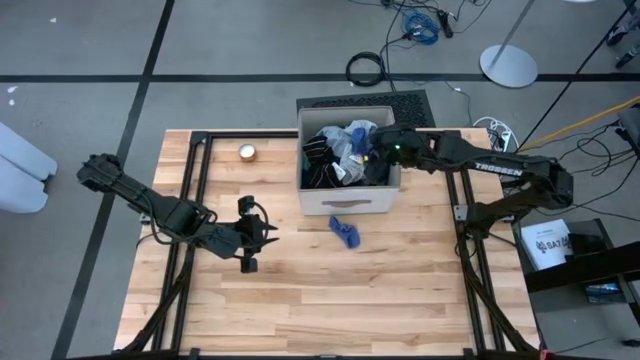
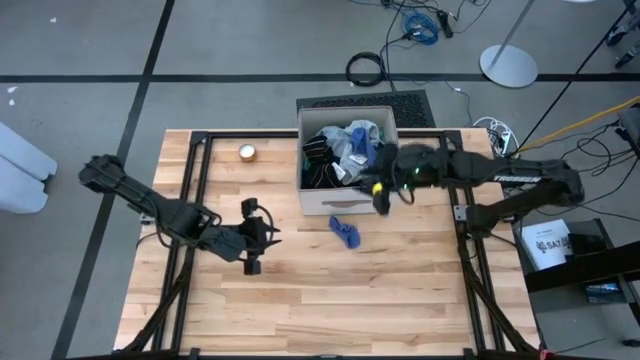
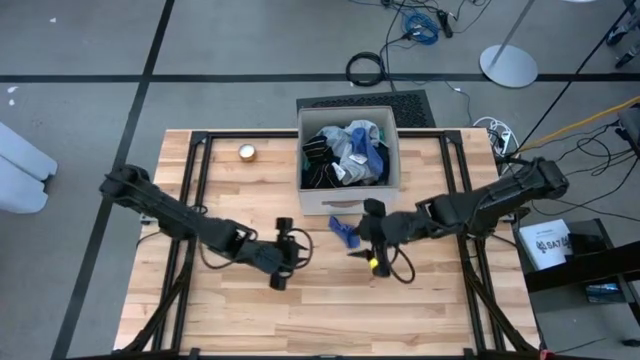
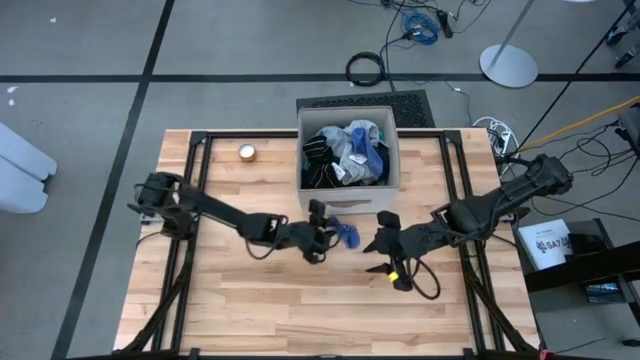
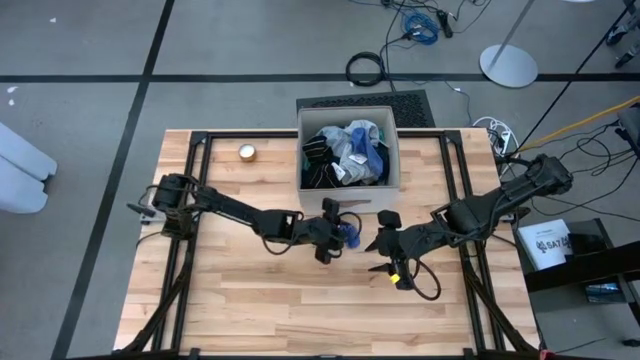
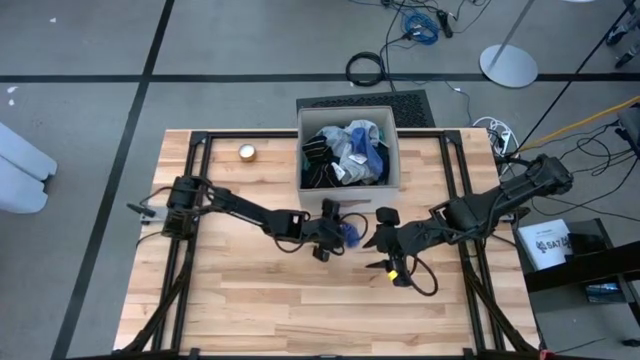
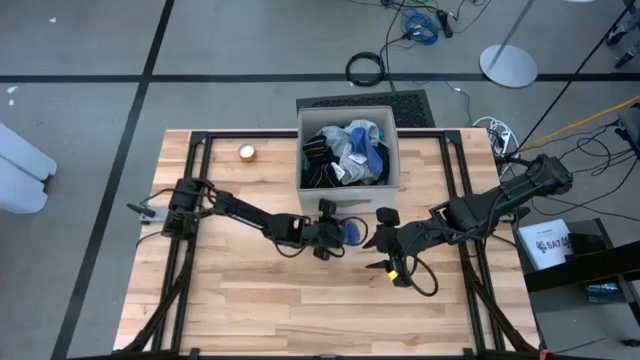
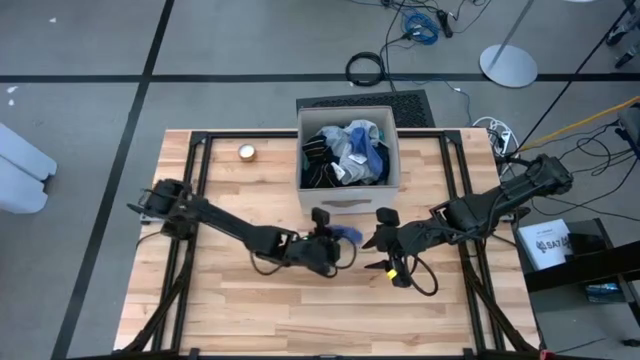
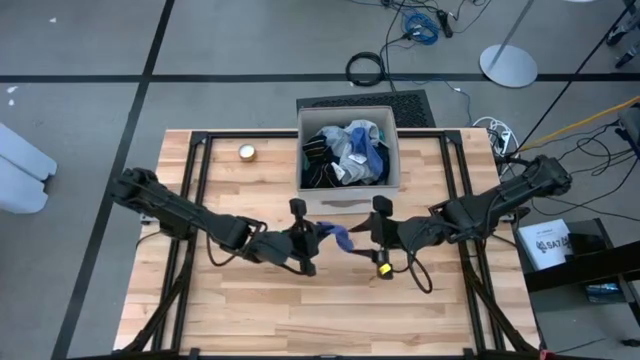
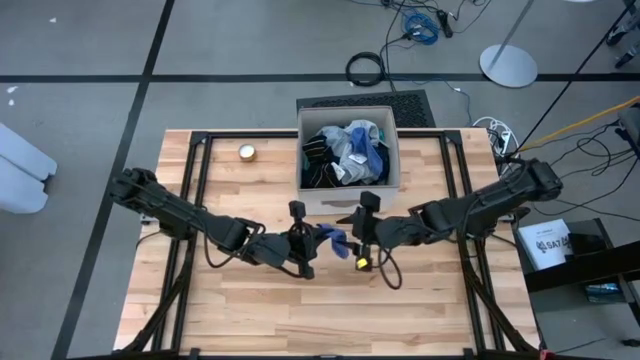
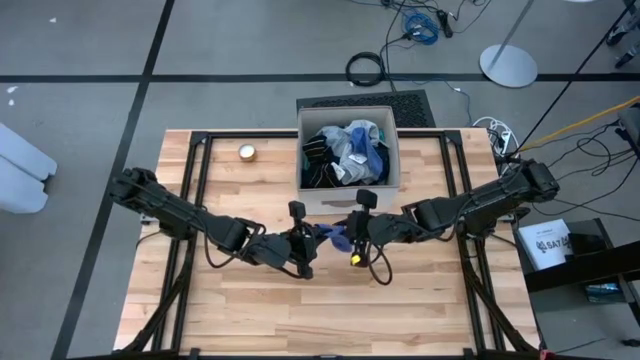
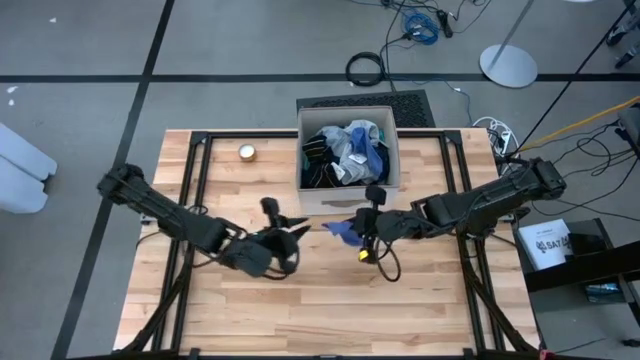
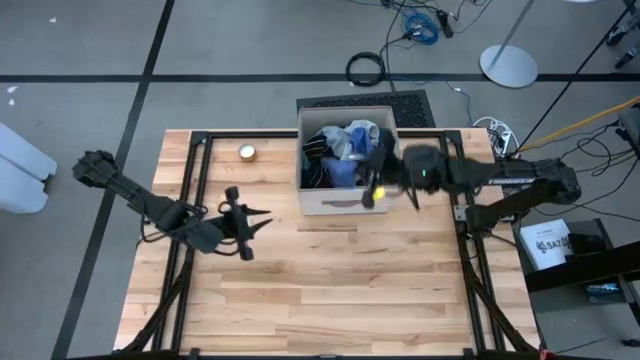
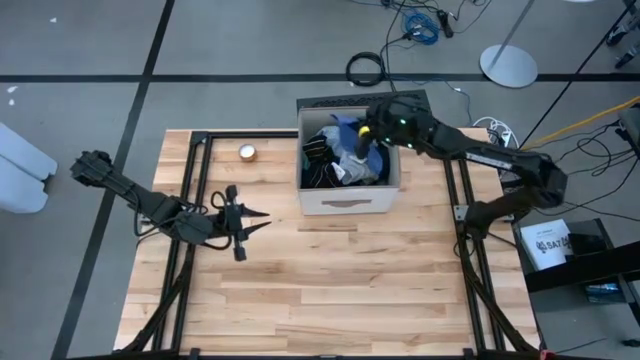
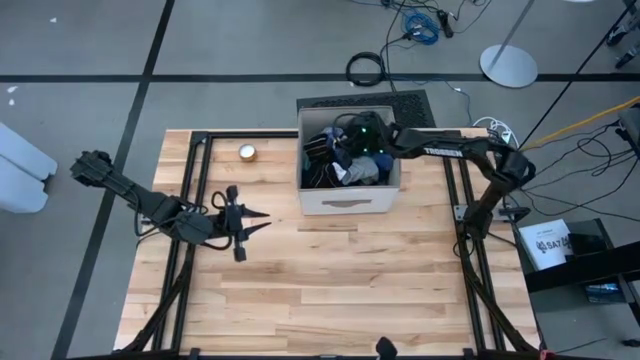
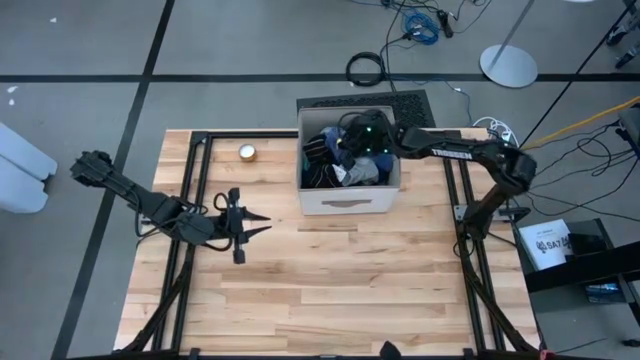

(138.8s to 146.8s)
Task: Sort clothes
Put the purple sock into the laundry organizer

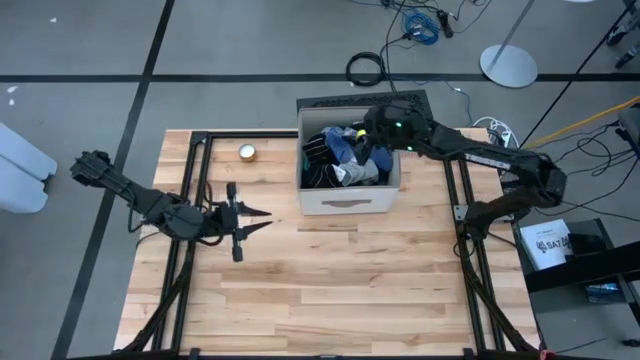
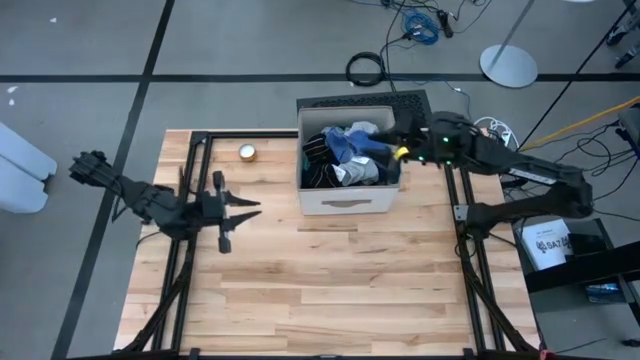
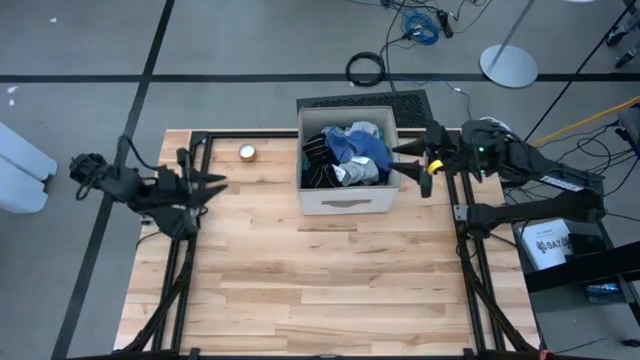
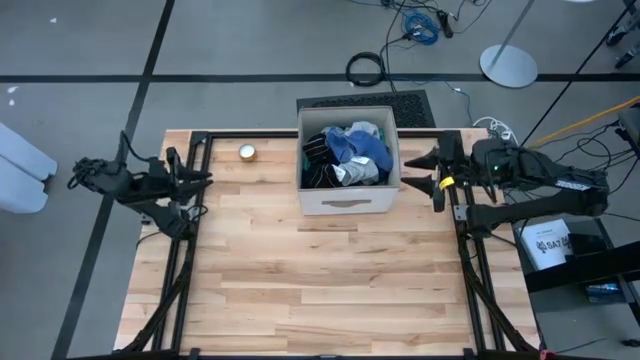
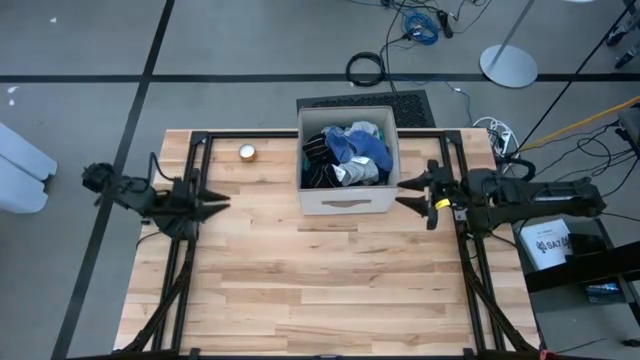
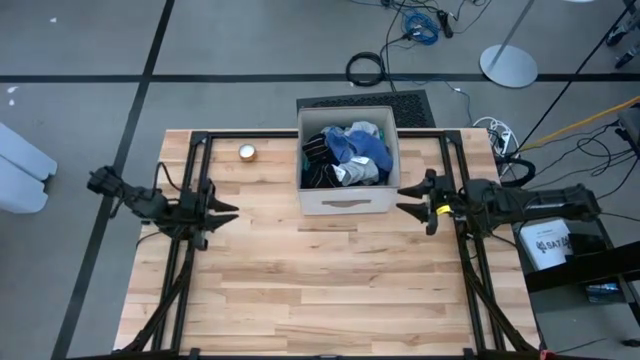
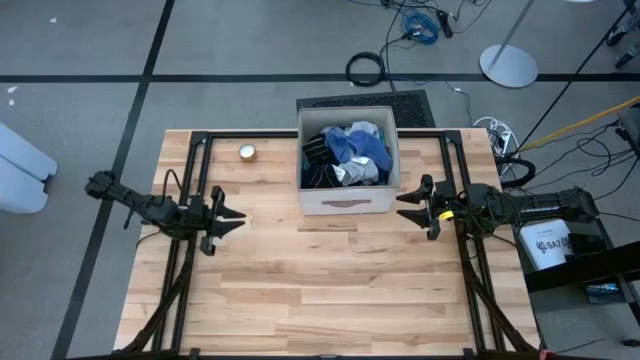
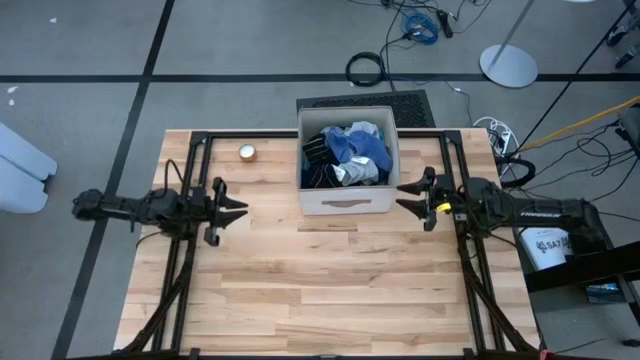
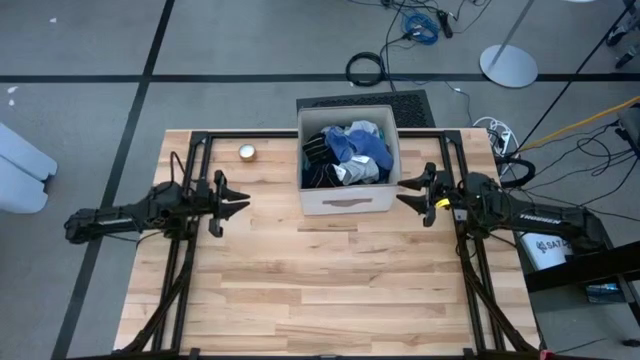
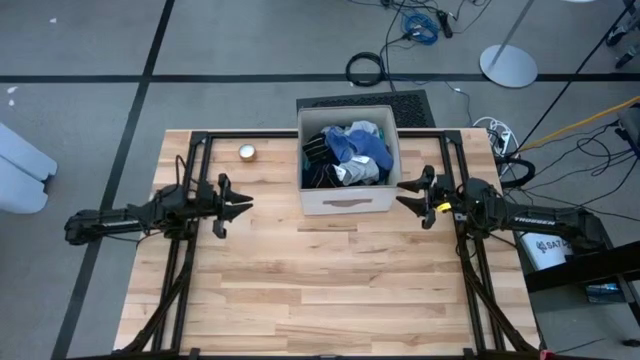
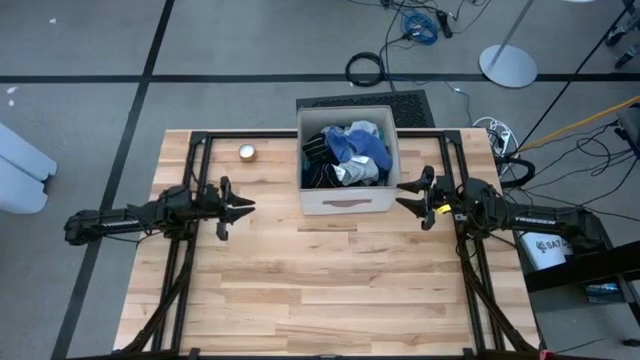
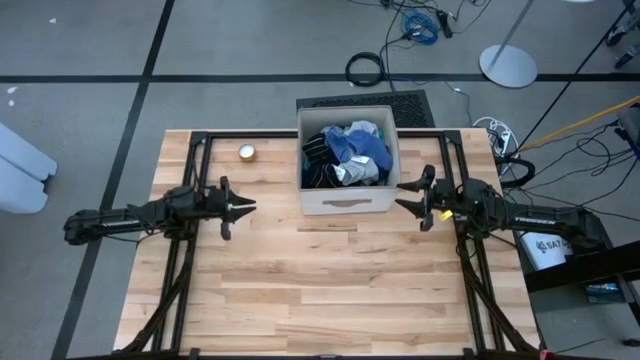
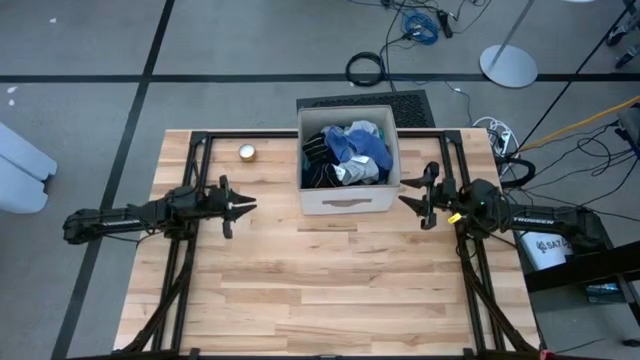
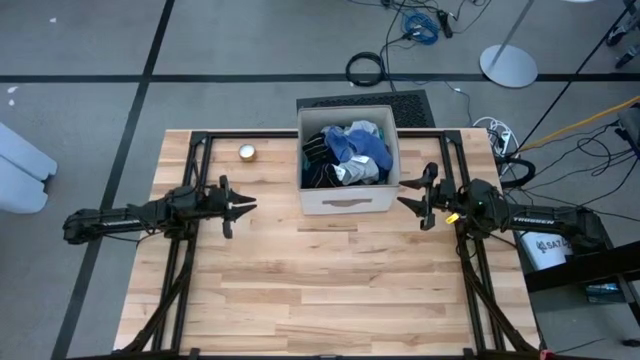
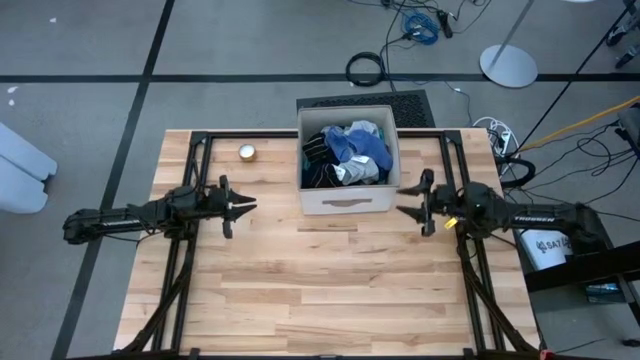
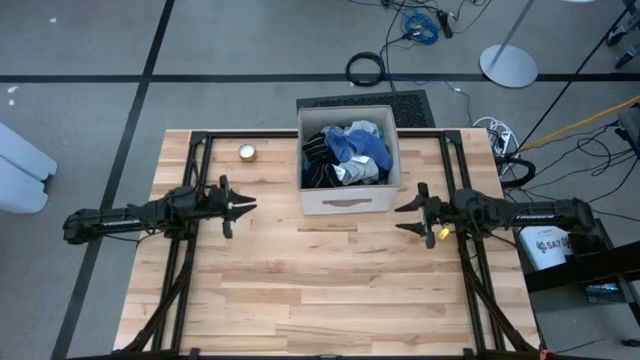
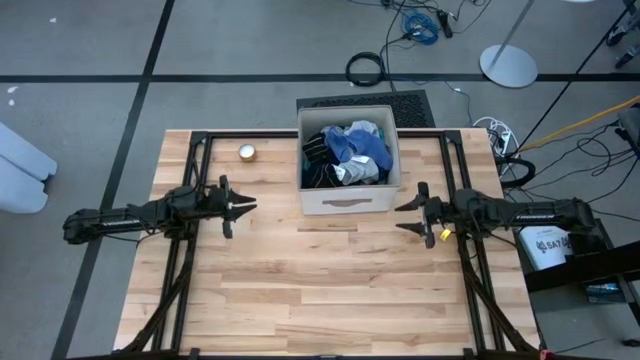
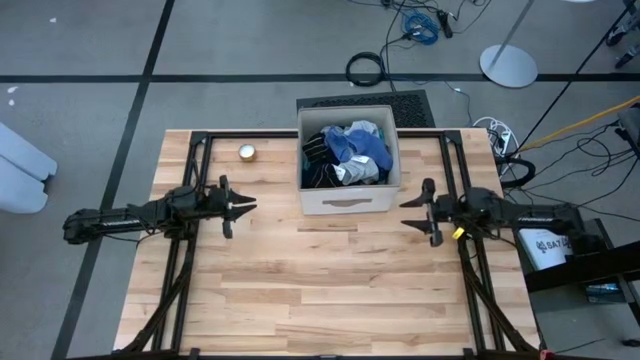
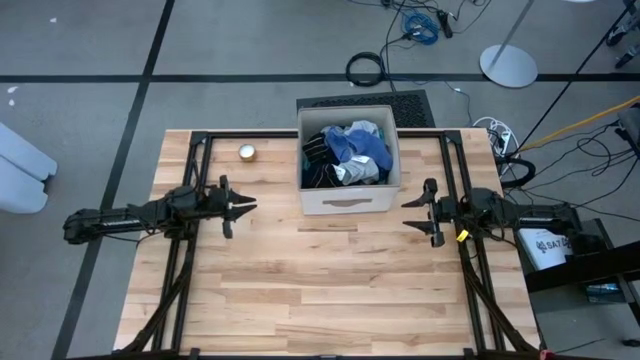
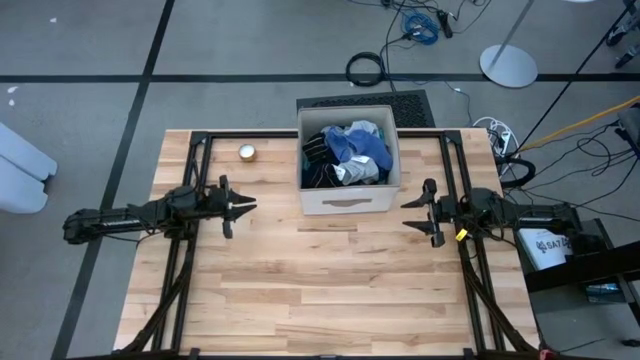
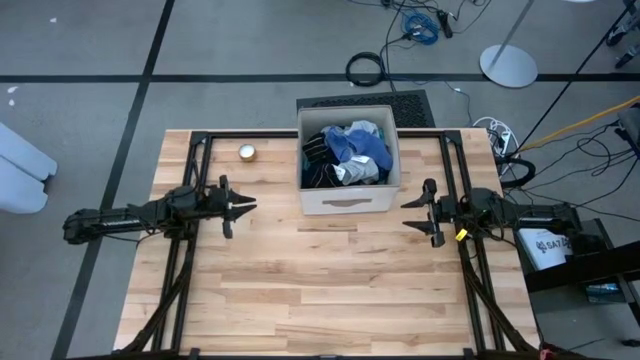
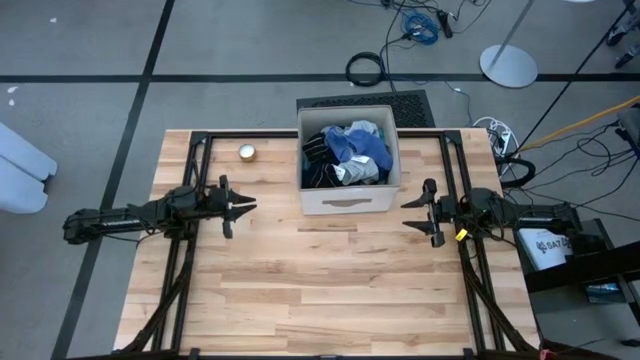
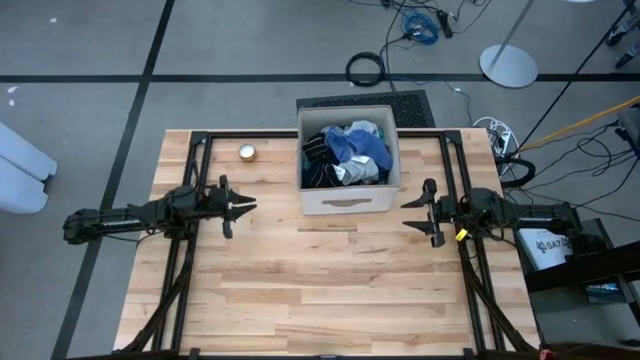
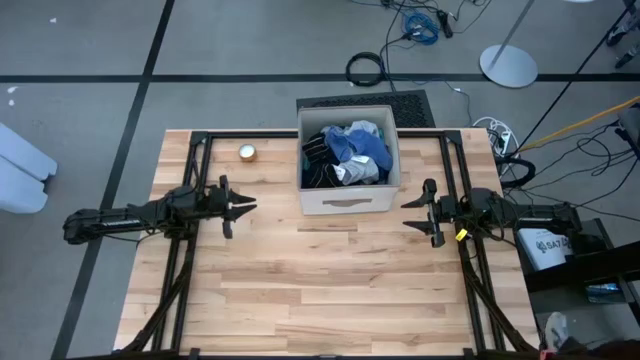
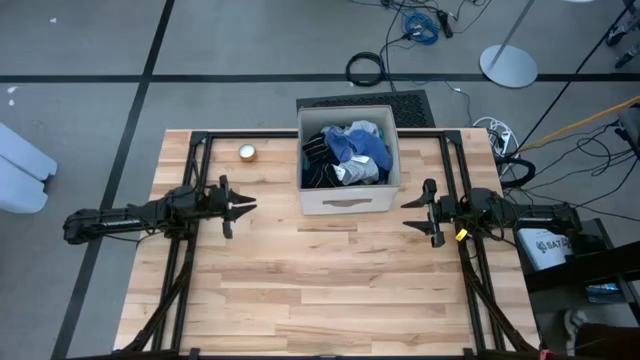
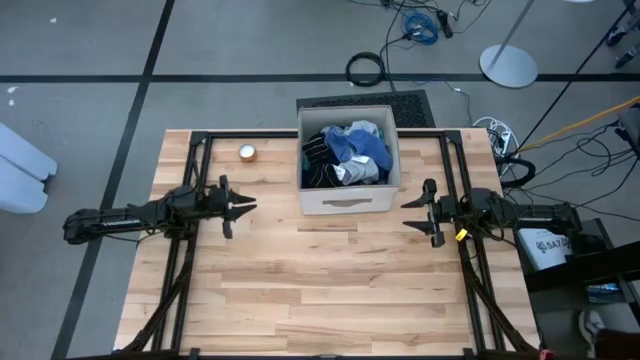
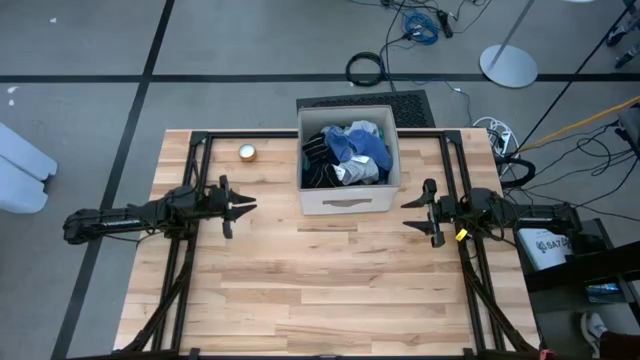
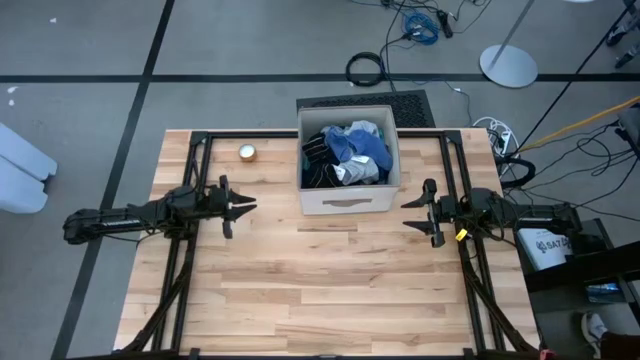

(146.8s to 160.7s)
Return to Home Position
